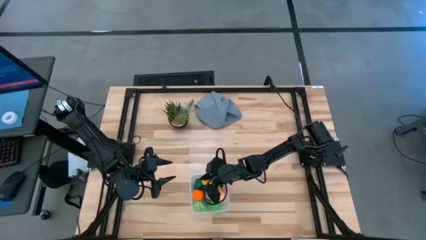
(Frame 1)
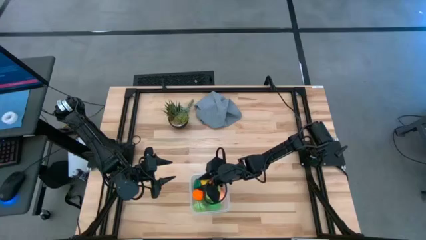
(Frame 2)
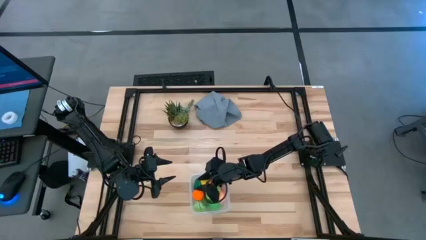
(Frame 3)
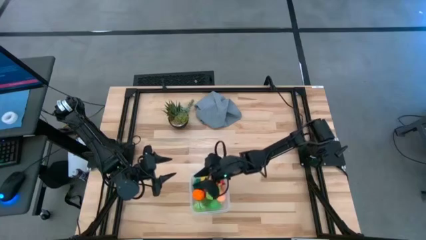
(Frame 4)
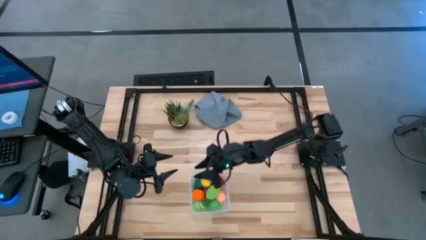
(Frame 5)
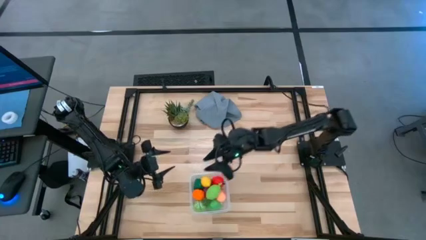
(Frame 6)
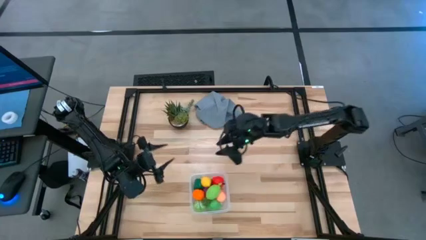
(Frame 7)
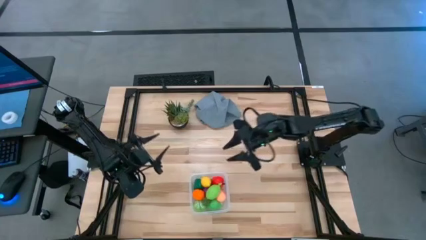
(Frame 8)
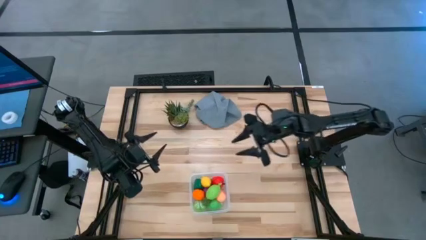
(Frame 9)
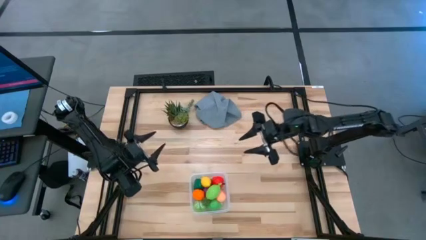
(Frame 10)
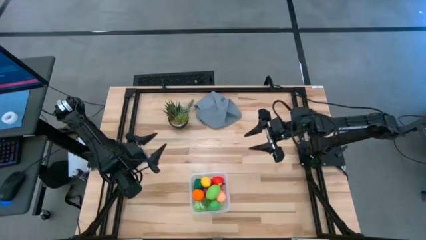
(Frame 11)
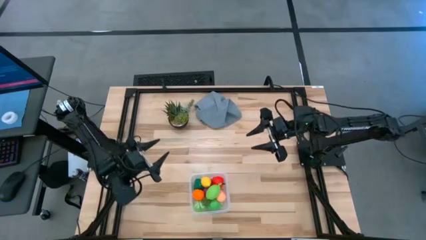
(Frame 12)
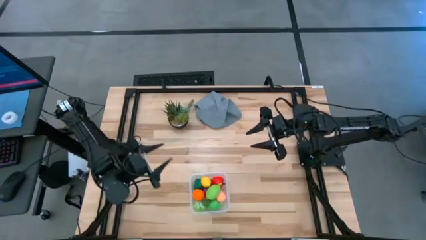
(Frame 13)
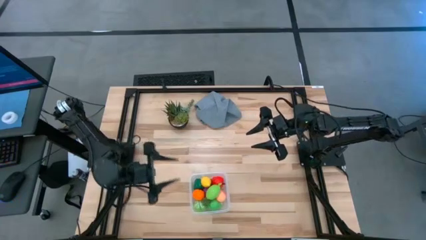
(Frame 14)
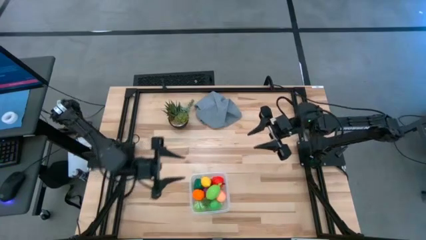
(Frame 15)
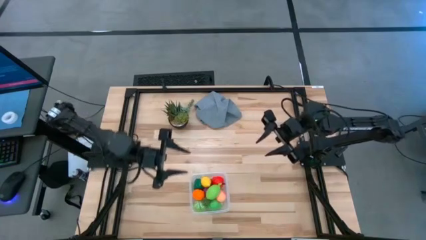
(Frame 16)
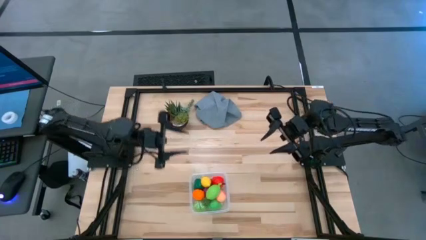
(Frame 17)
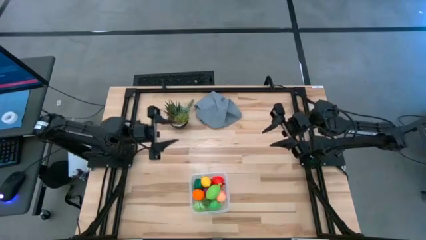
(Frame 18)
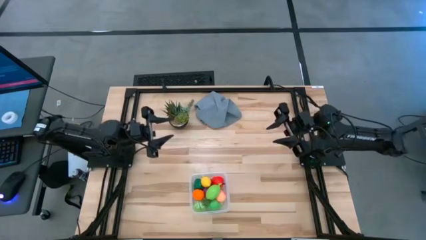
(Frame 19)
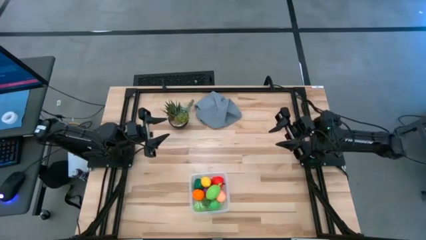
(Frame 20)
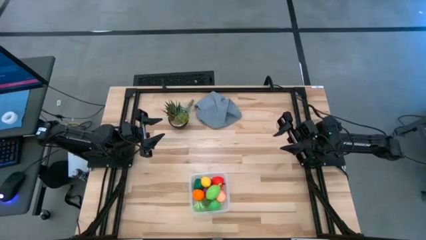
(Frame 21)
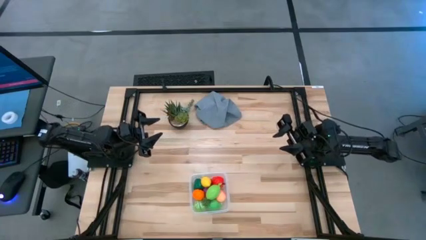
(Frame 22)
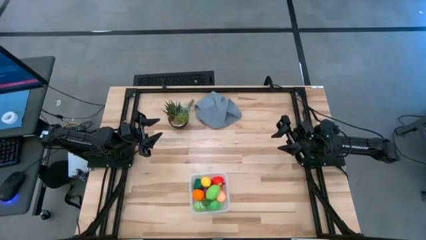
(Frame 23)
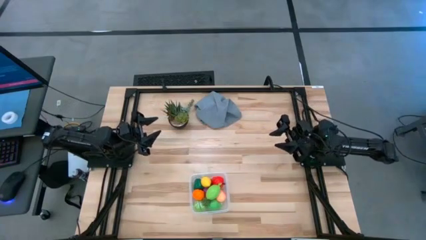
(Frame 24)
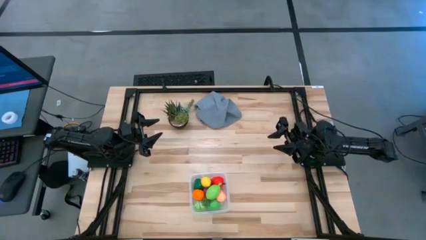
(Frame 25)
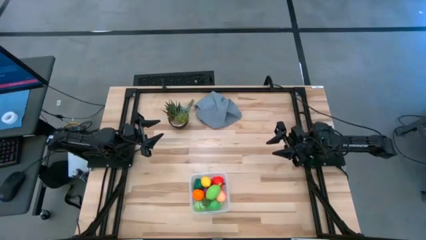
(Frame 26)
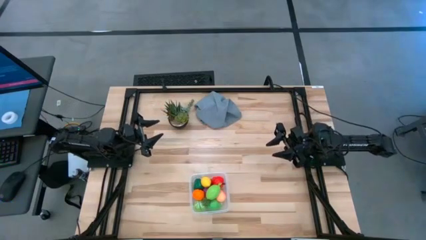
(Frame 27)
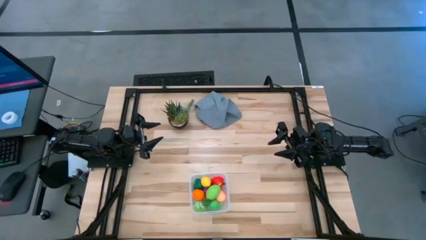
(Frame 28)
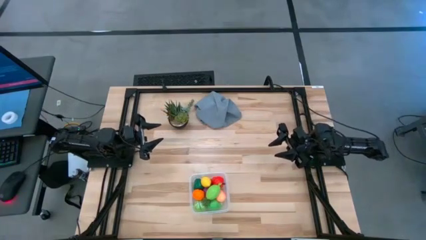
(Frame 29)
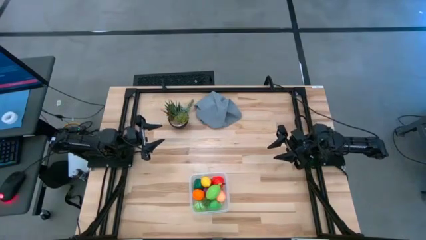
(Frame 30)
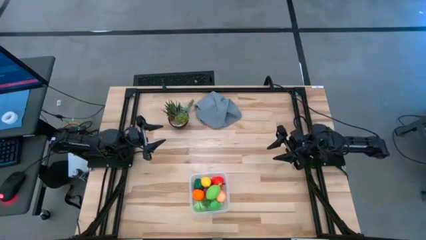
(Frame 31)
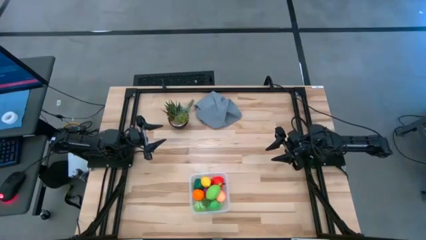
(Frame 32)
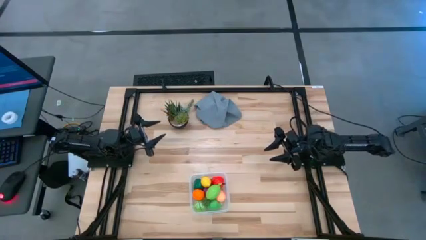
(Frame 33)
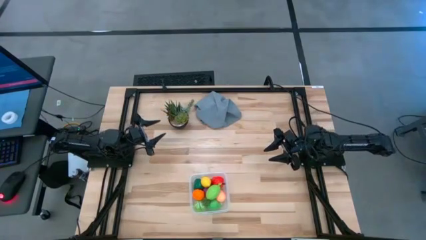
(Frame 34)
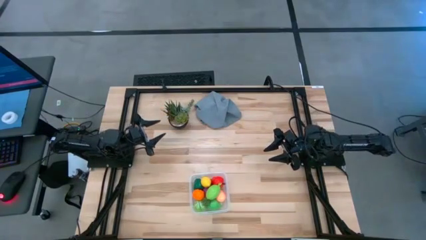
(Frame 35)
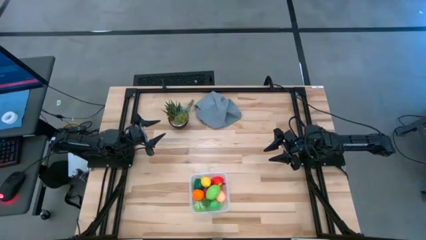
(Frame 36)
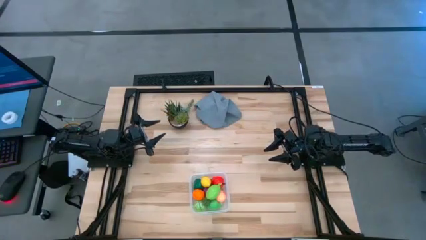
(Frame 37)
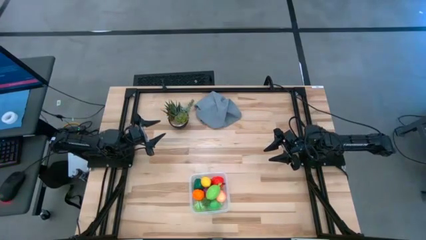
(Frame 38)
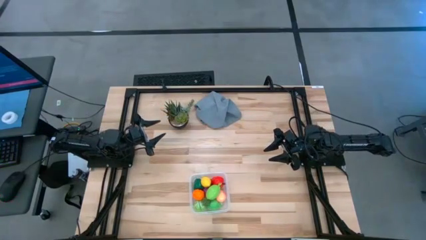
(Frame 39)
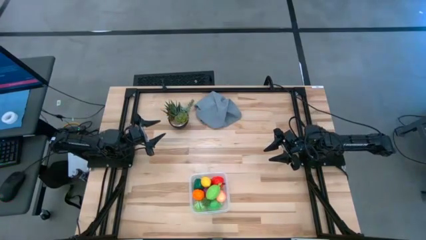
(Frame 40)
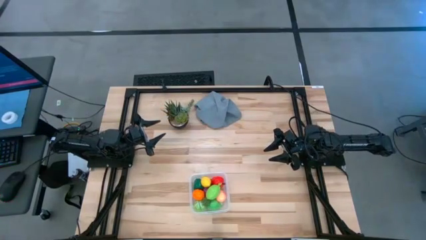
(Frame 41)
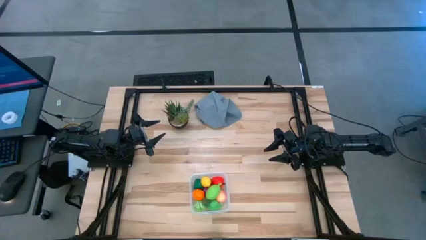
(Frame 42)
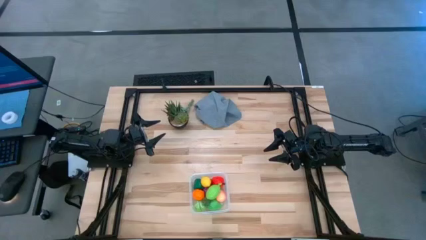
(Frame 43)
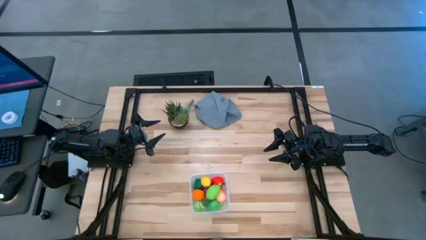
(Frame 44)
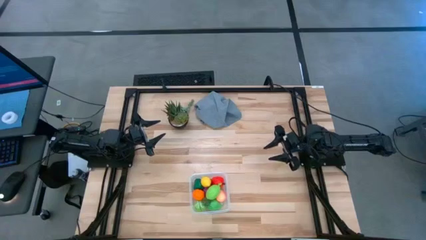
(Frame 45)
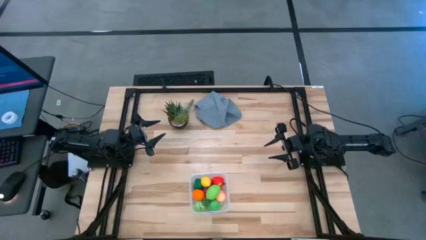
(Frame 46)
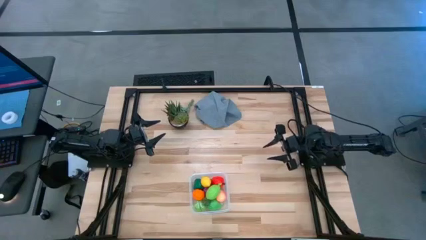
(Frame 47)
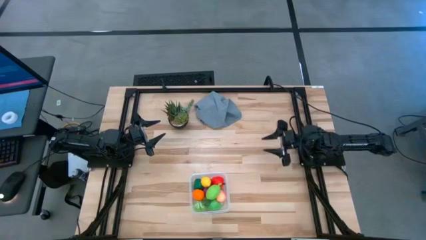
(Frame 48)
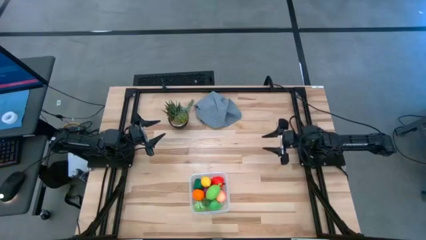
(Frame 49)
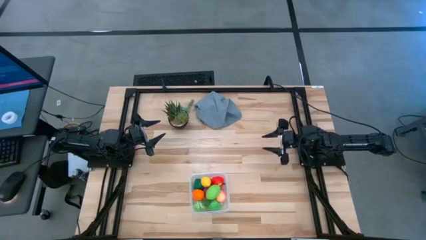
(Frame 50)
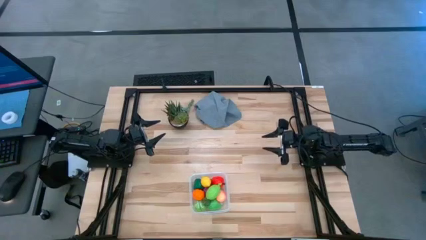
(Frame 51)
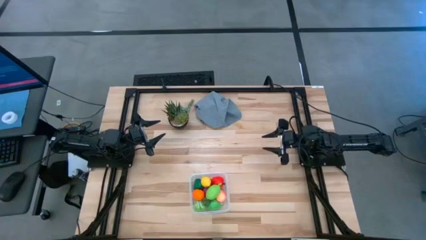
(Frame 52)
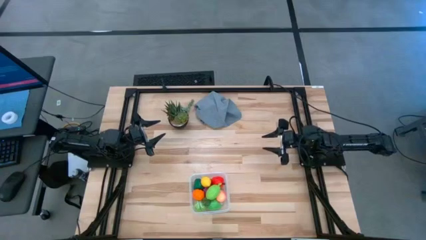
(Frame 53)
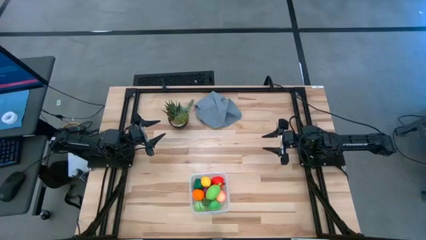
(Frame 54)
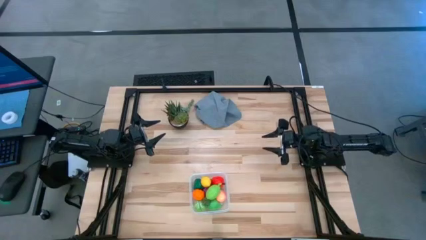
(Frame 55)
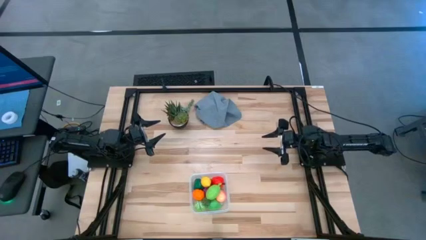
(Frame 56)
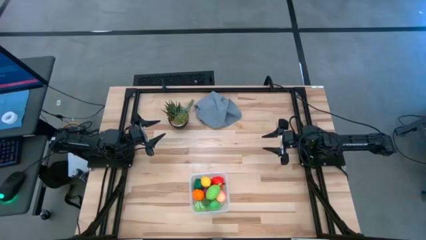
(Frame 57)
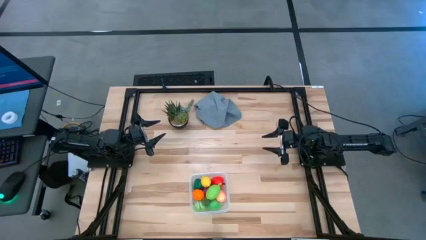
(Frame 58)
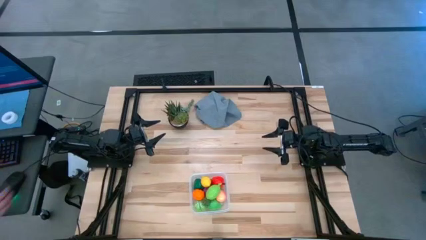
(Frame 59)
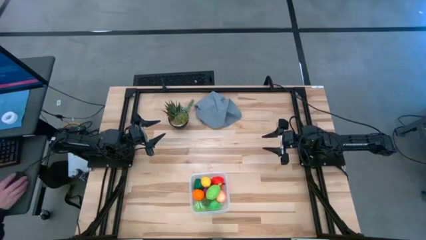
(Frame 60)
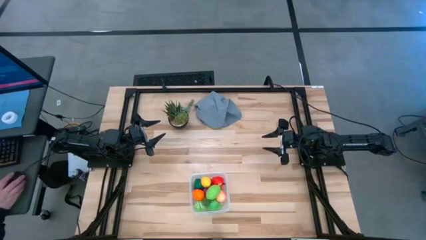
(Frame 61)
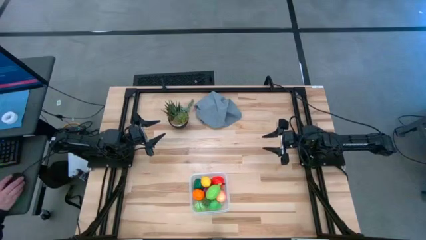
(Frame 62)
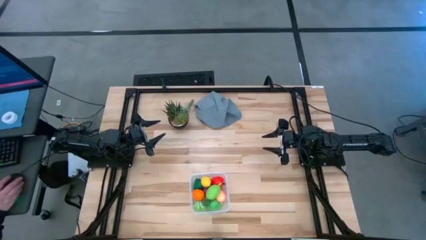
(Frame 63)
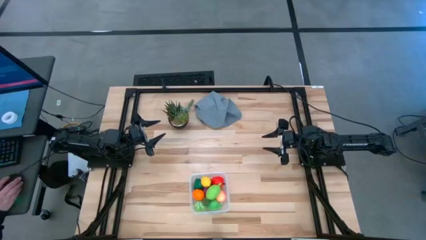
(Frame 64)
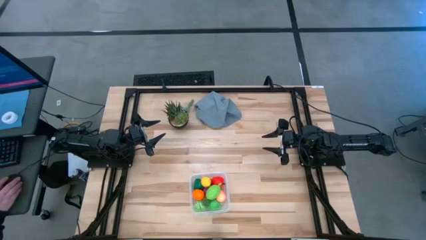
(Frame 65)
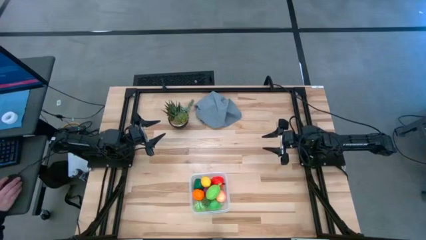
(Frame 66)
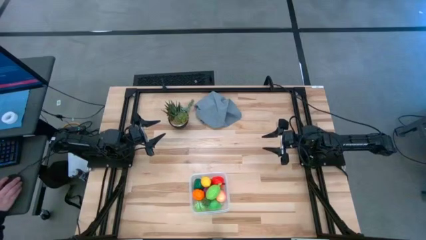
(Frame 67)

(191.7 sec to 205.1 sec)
Task: Pick and placing Produce into tupperware
Return to Home Position
